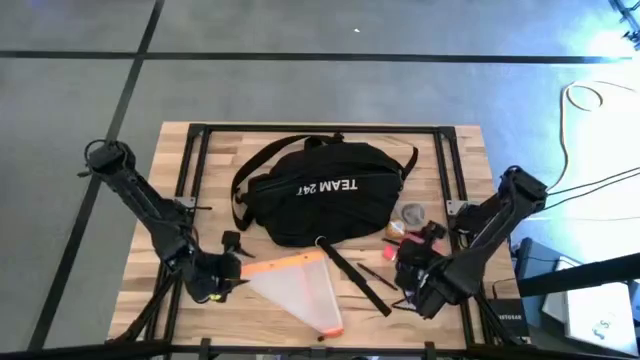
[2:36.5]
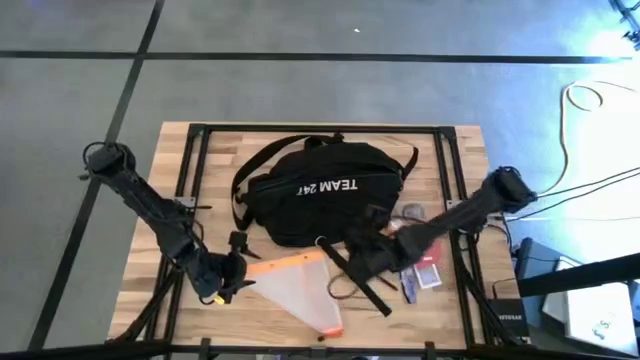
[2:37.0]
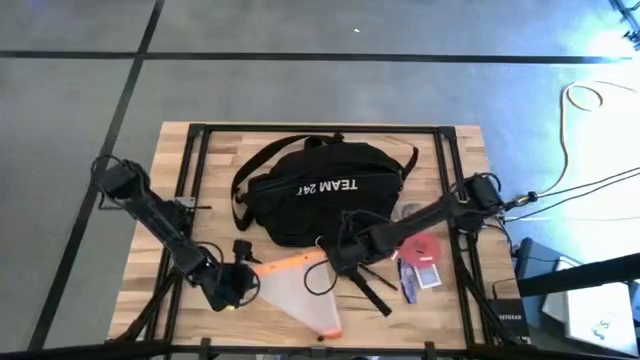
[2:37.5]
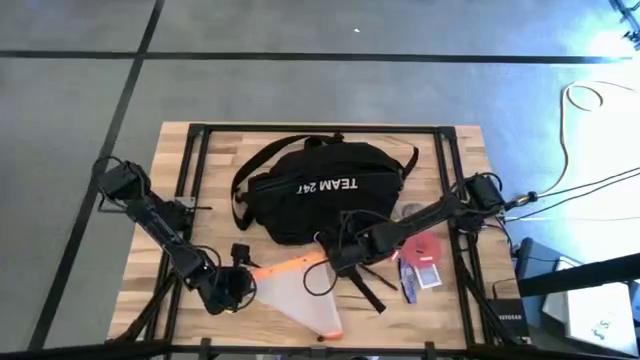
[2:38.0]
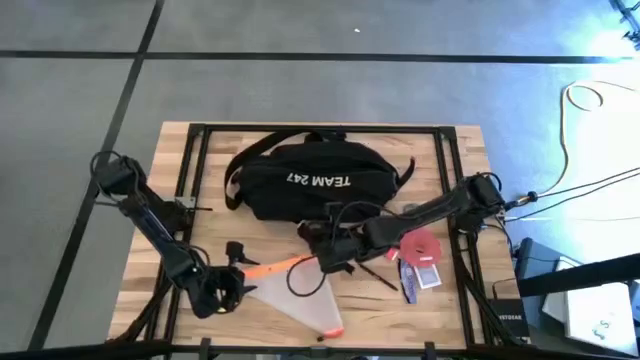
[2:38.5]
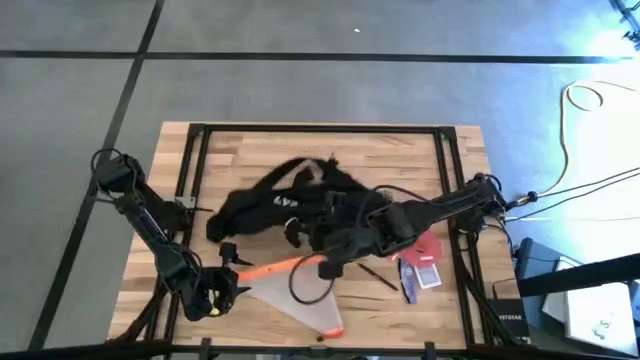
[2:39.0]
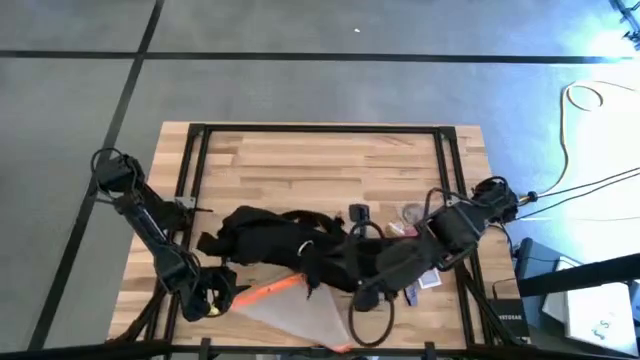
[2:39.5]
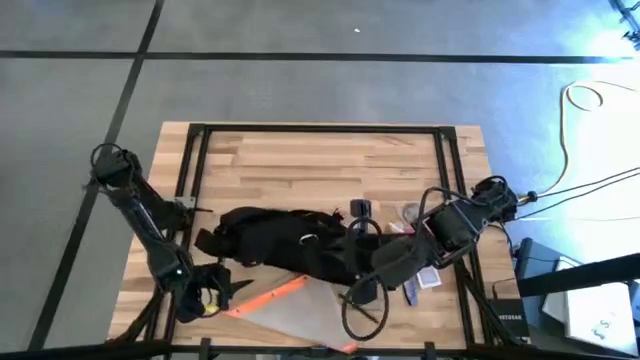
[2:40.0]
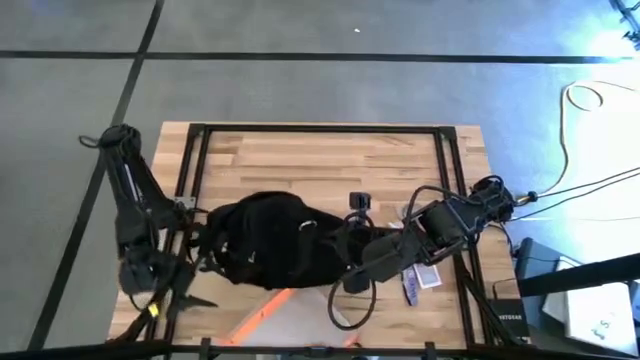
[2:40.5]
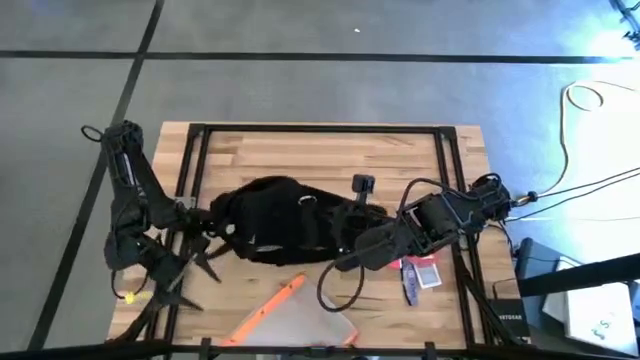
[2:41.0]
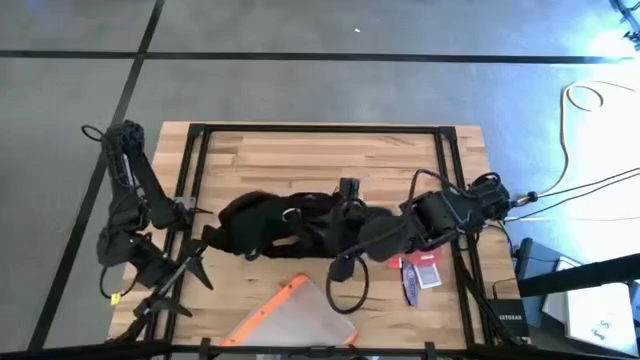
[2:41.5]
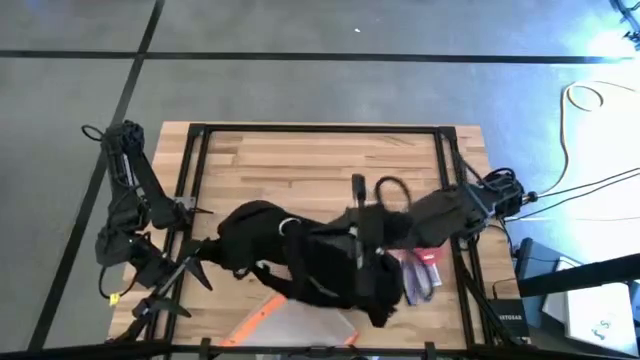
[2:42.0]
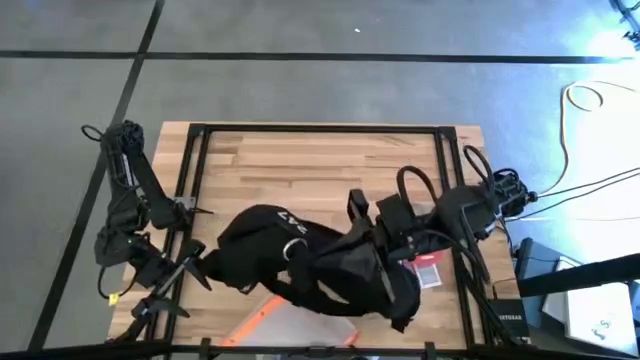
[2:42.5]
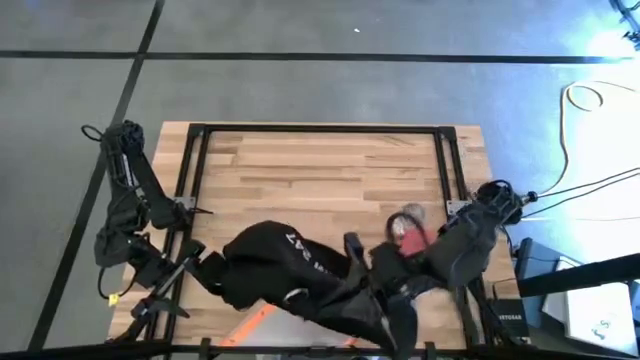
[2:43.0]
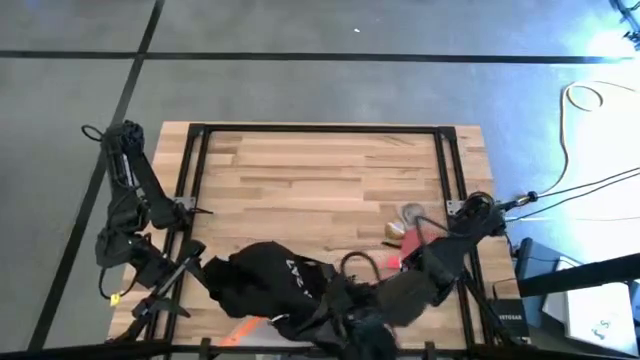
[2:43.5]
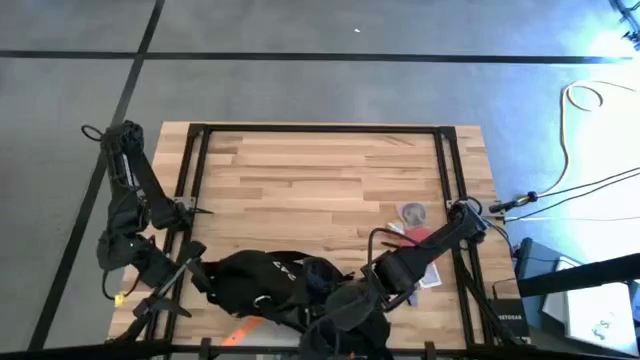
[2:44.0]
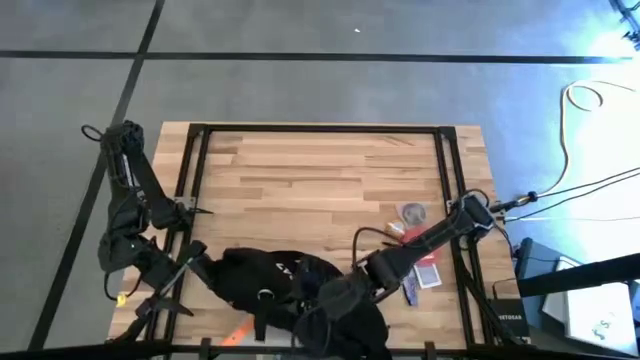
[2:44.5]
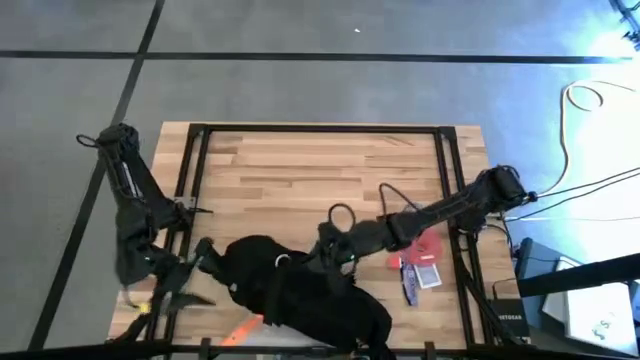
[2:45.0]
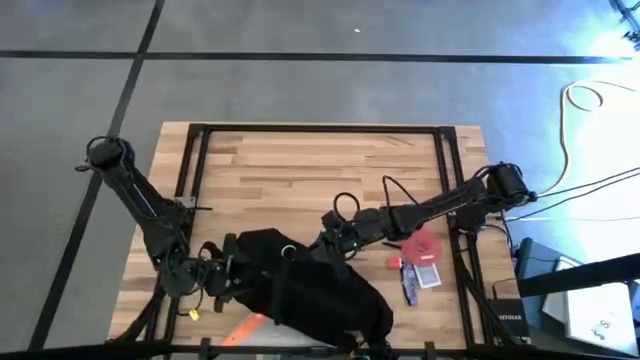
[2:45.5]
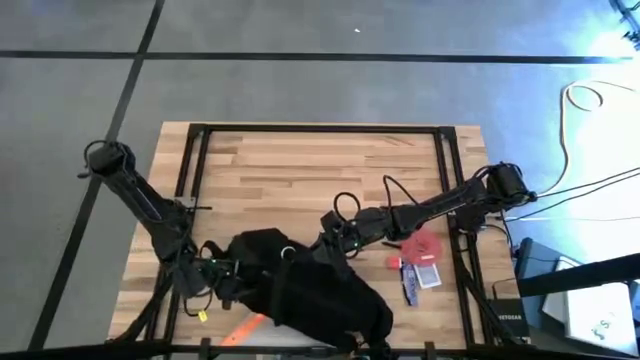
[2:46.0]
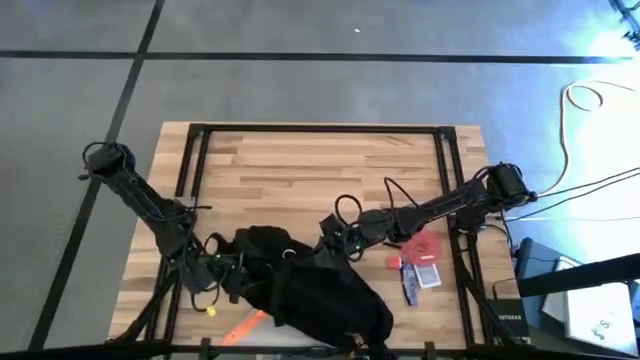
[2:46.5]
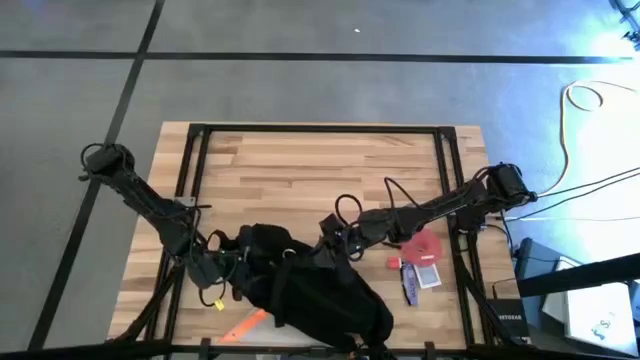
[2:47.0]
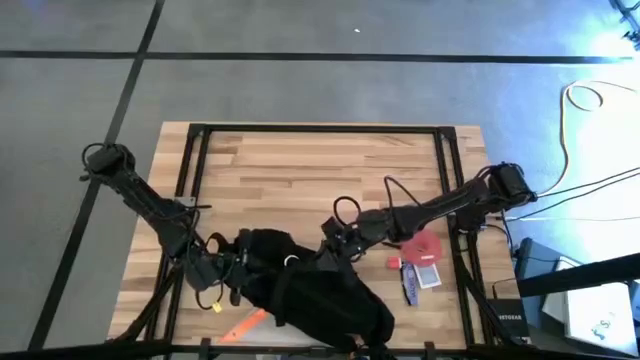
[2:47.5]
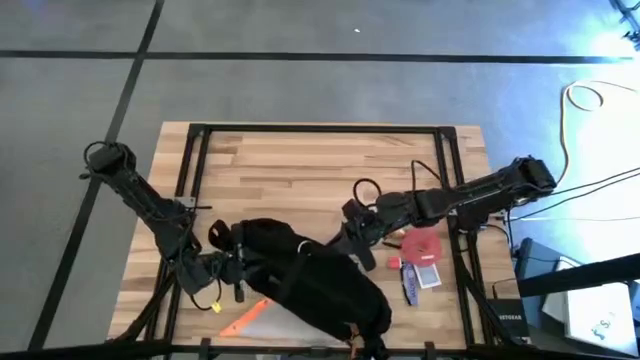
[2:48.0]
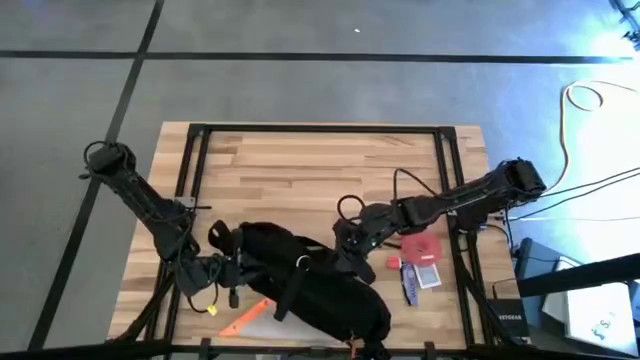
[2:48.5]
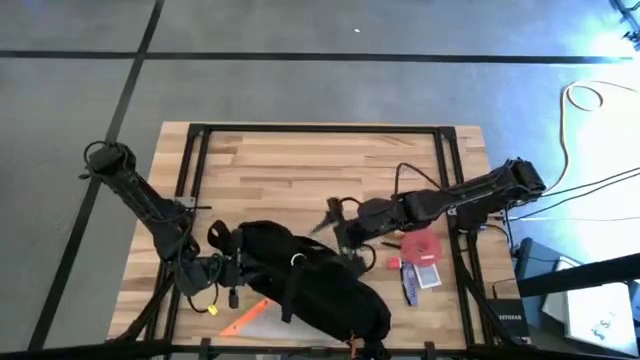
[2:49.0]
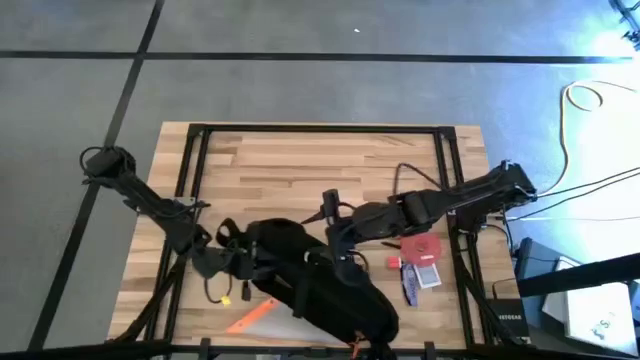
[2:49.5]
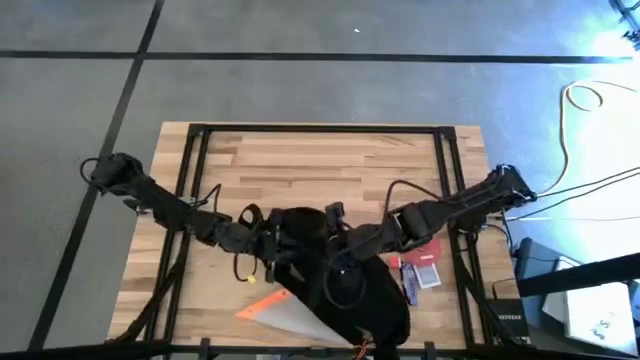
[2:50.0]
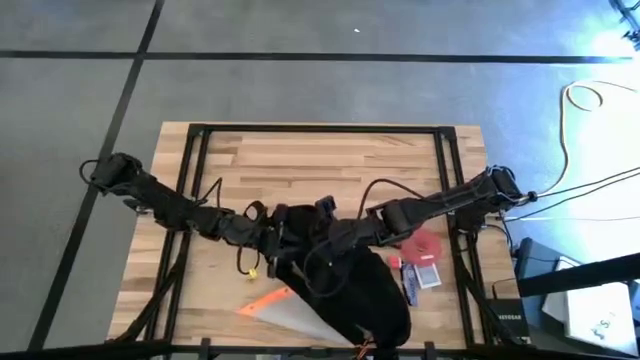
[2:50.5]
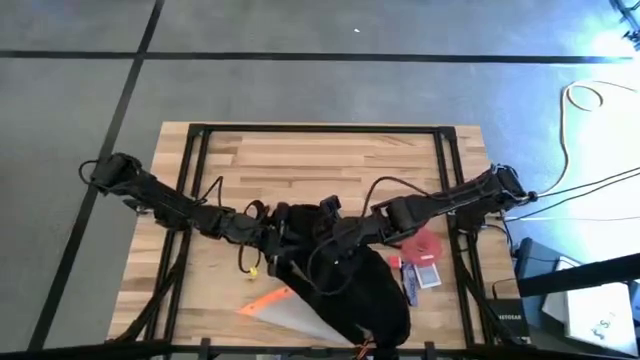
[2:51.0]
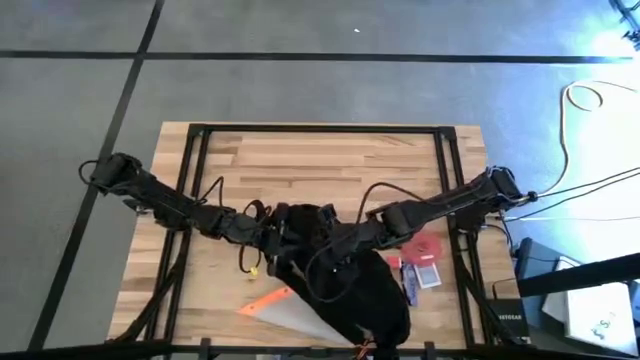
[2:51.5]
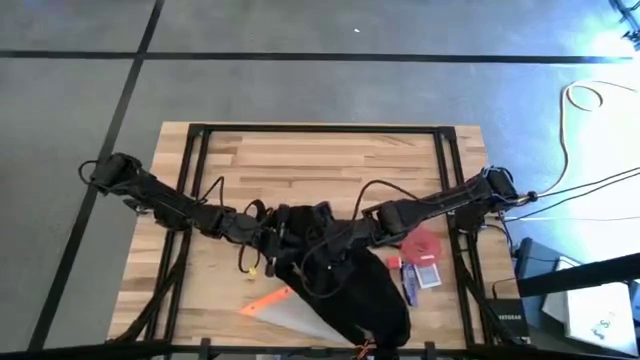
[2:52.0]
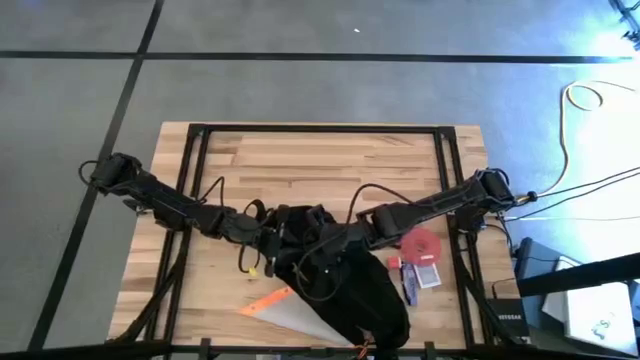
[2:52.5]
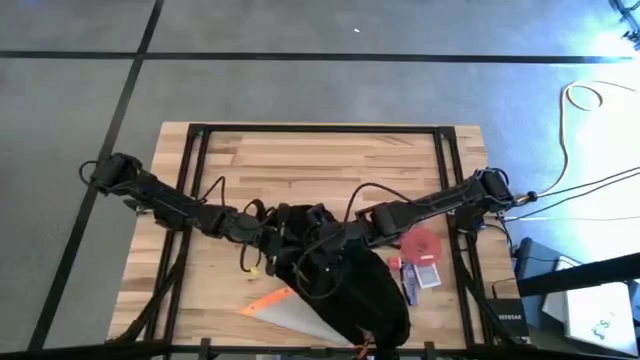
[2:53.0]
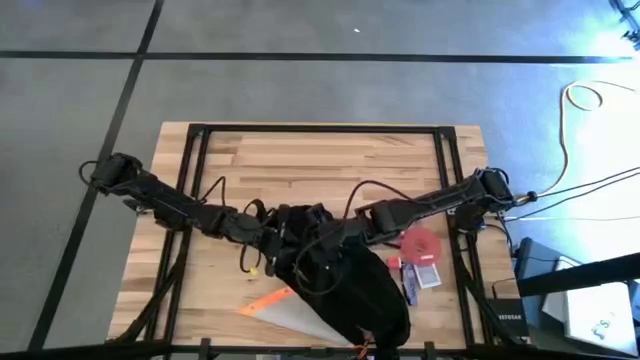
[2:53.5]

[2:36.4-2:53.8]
Task: Unpack backpack
Open the black bag
